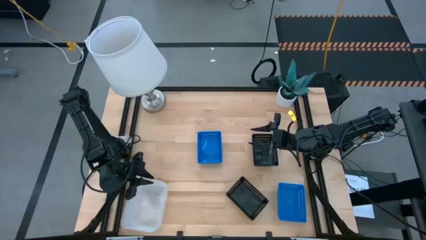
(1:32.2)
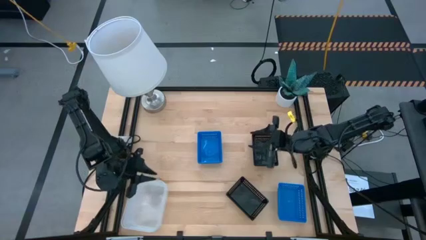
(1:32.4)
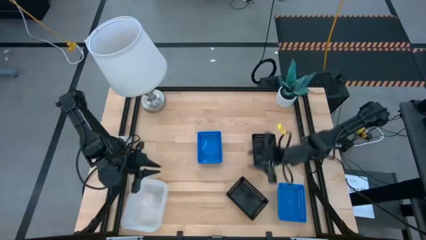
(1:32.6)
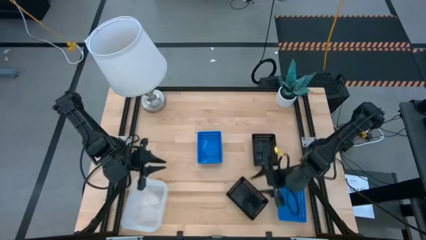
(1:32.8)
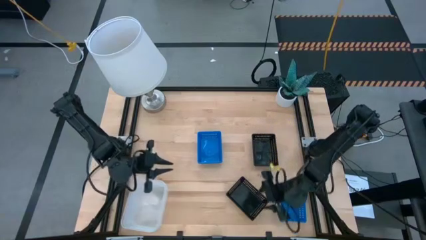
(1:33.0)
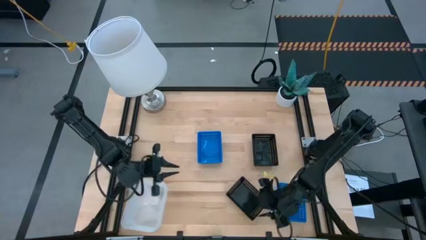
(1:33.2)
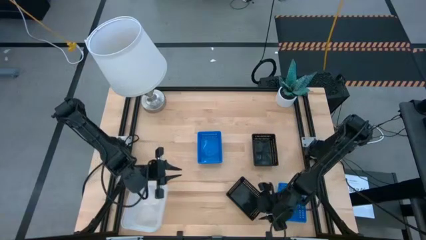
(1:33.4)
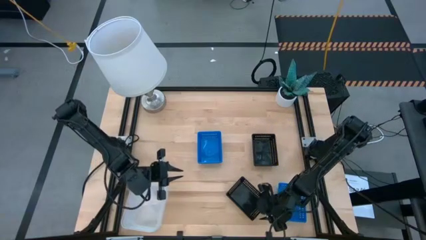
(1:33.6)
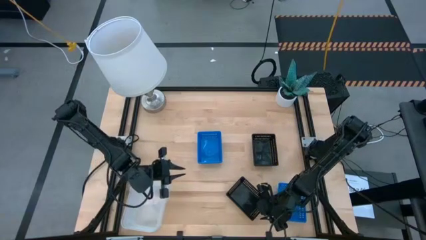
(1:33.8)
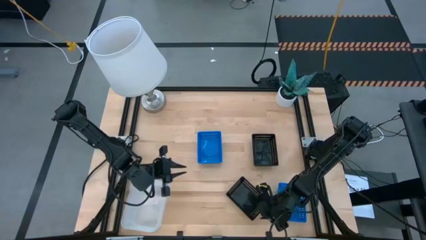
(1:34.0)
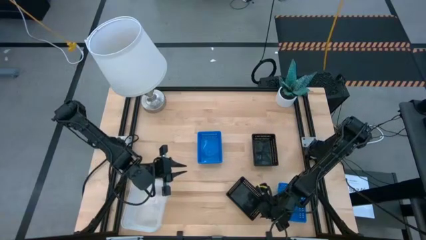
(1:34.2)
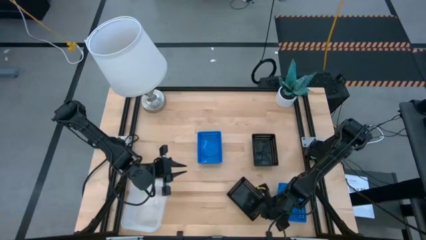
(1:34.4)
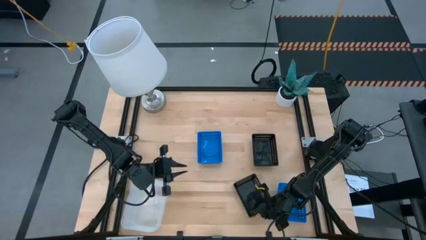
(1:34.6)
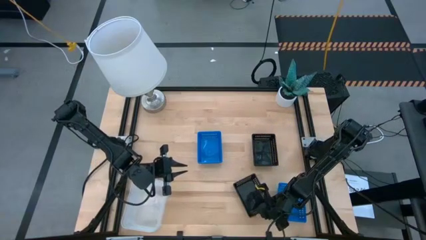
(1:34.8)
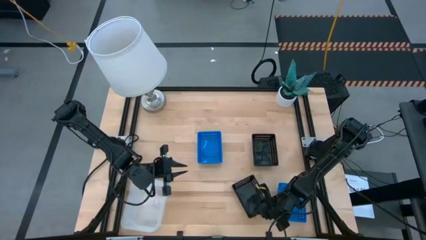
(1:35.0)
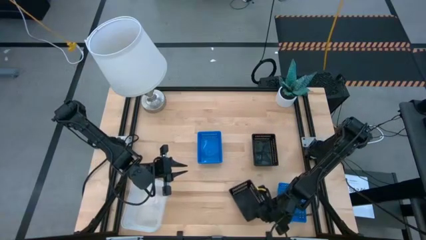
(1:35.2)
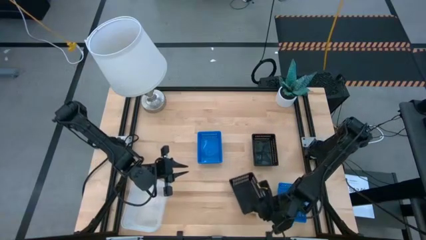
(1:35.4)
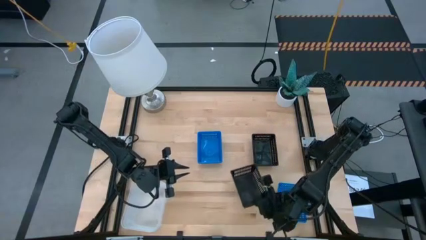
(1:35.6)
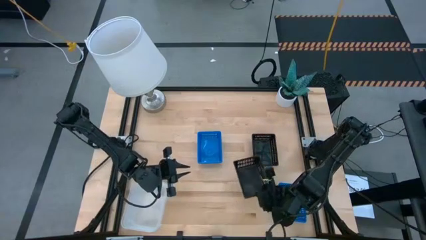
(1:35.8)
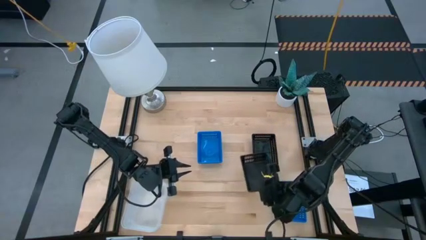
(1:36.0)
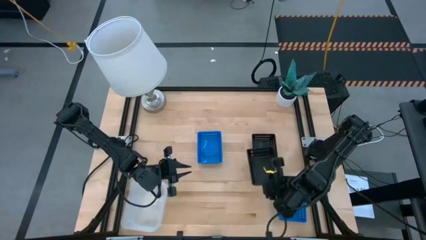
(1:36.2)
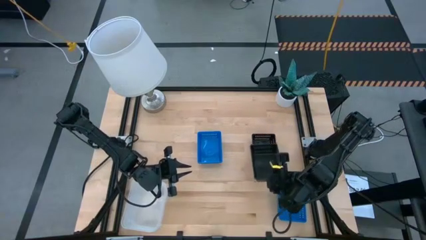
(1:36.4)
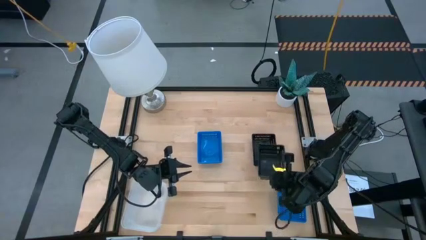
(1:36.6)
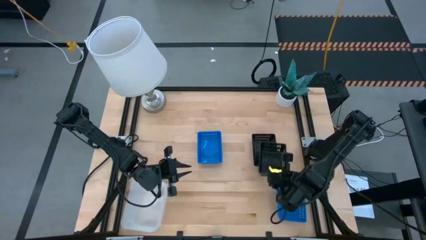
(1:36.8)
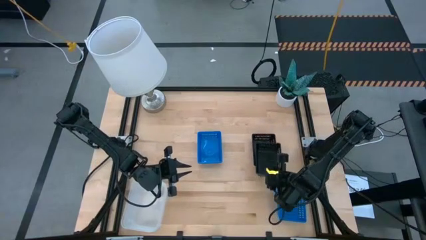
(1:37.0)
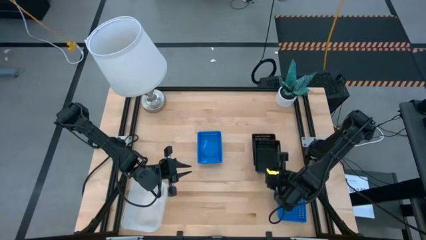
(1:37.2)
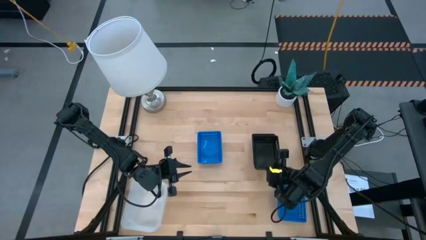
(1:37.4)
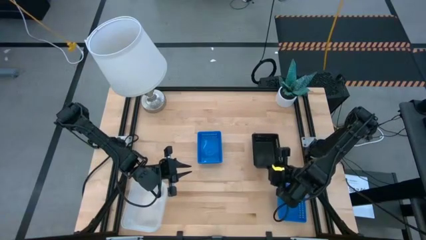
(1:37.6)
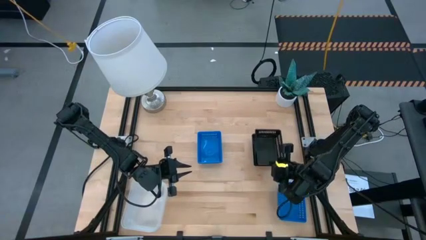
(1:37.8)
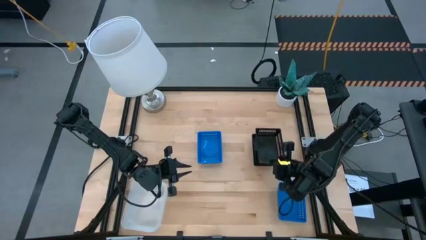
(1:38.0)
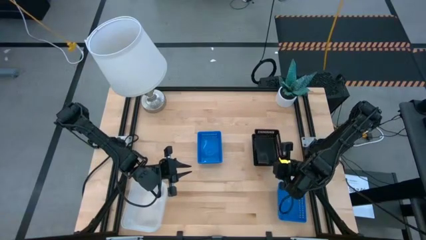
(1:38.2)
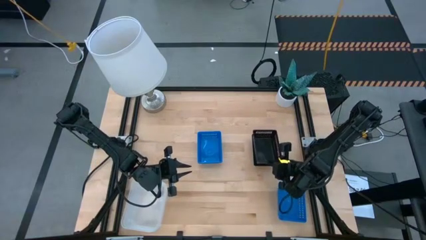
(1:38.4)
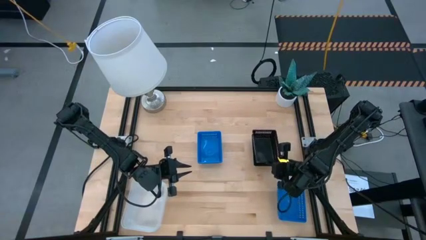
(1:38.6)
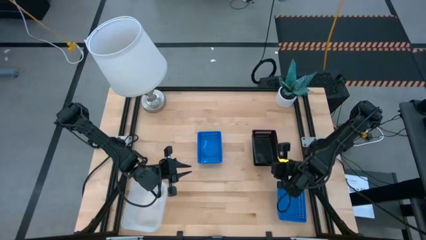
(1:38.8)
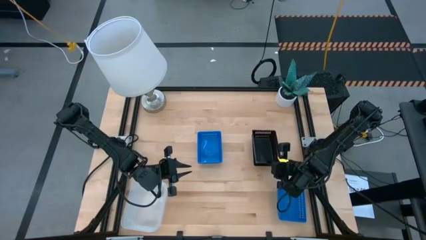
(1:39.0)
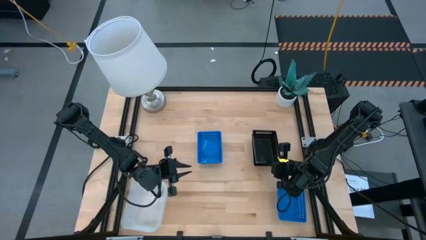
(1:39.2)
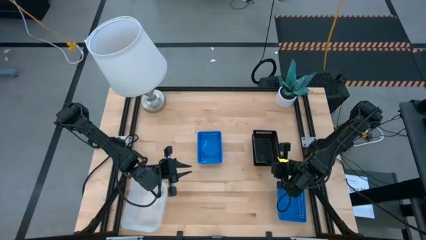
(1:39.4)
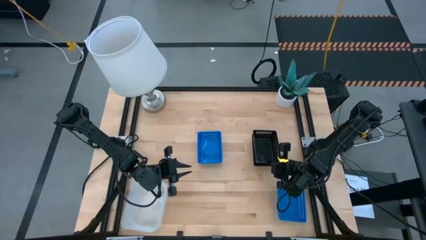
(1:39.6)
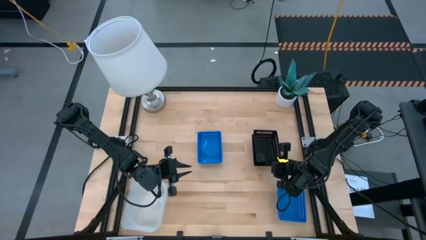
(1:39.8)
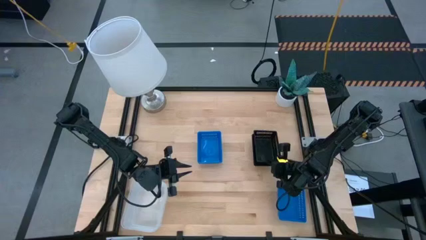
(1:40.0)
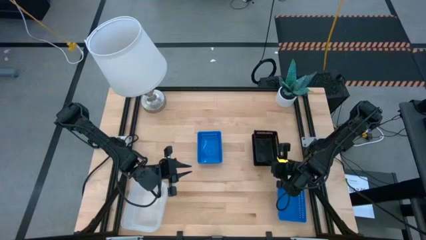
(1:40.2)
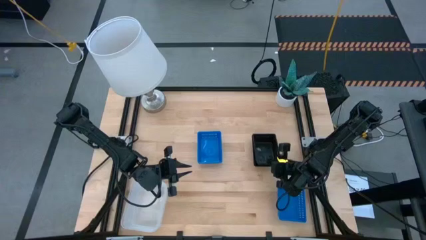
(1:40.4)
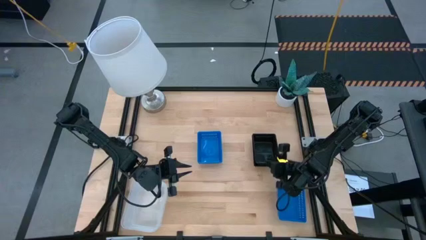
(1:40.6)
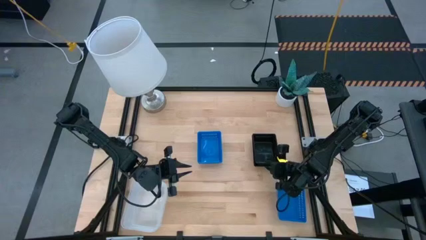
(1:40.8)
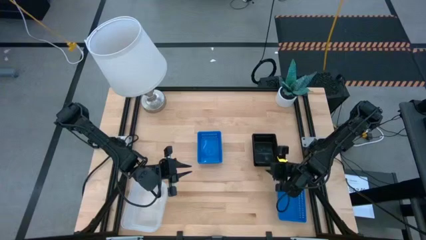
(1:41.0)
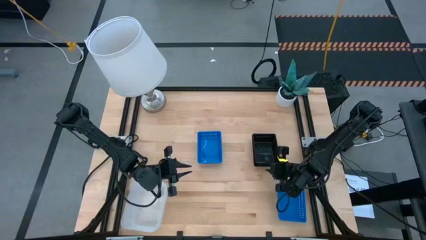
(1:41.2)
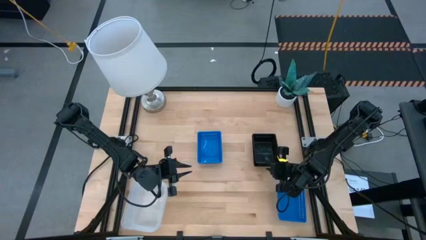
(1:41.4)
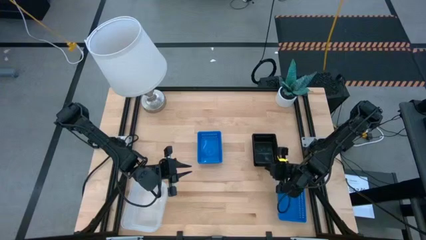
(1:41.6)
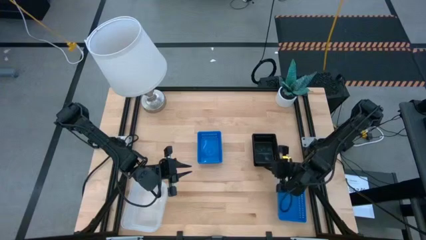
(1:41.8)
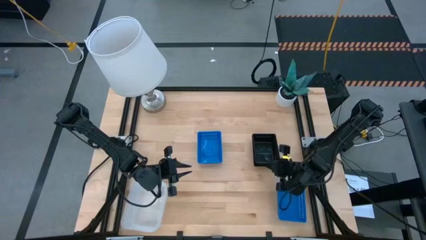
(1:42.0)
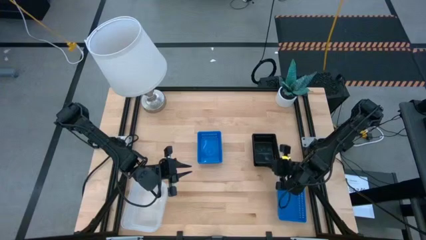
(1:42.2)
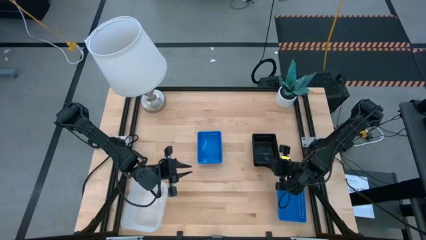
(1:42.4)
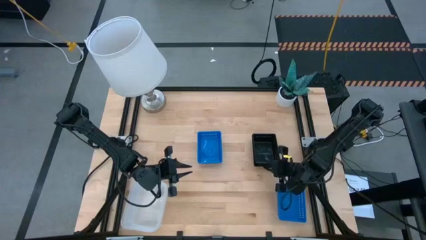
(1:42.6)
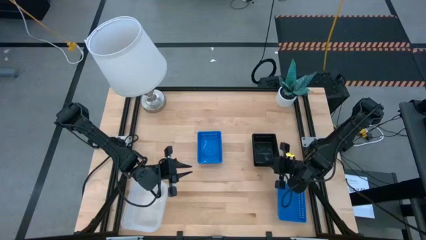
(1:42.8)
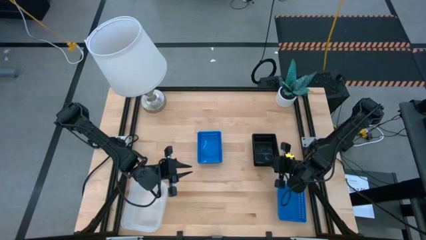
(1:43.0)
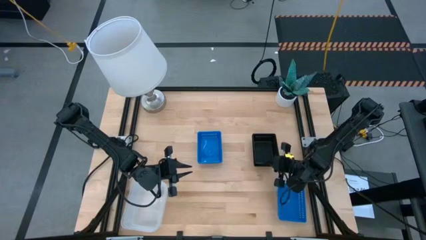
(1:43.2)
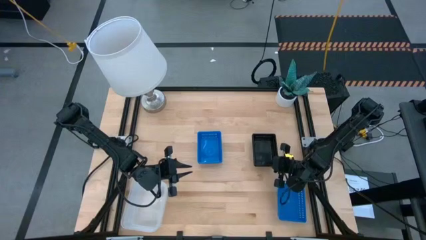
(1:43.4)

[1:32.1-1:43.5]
Stack the bottom black bin on the top black bin

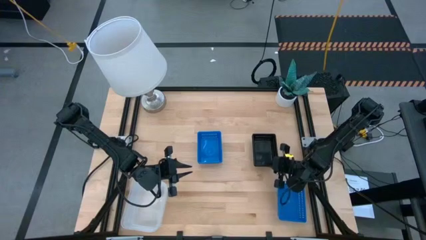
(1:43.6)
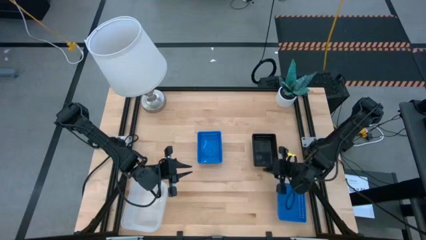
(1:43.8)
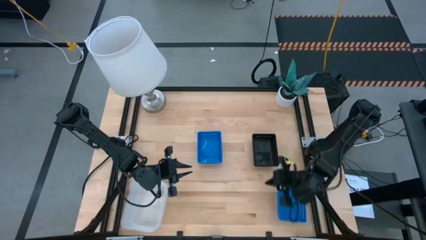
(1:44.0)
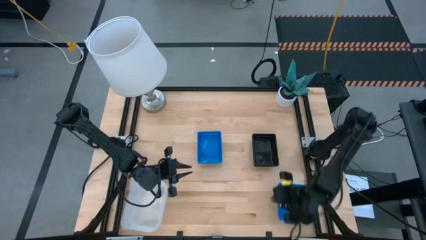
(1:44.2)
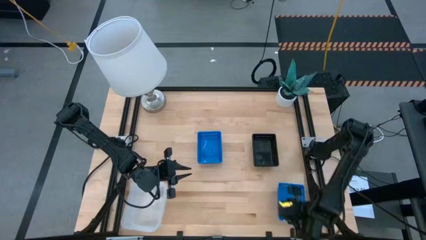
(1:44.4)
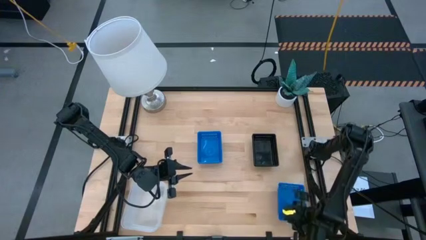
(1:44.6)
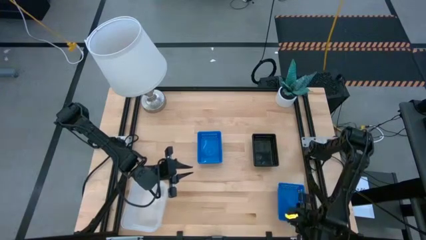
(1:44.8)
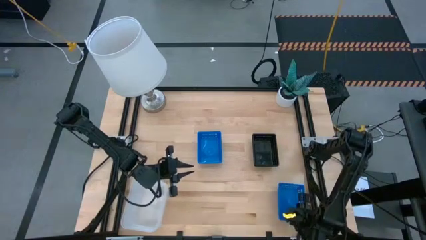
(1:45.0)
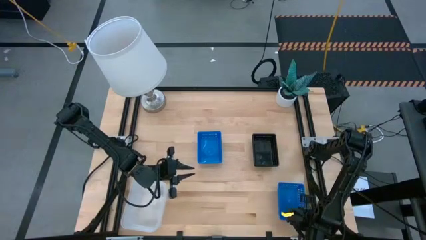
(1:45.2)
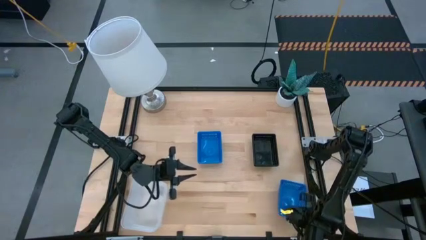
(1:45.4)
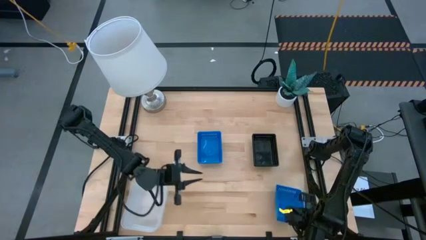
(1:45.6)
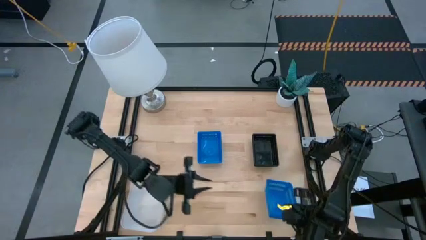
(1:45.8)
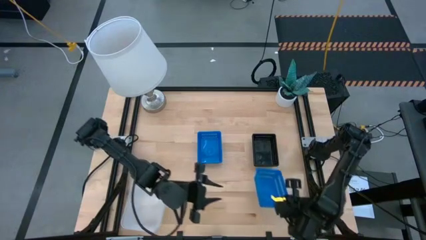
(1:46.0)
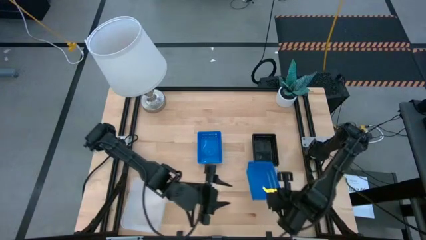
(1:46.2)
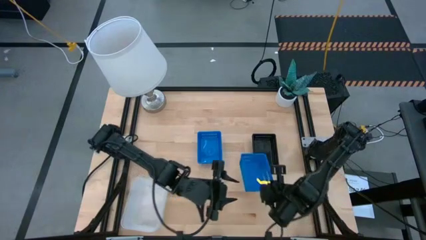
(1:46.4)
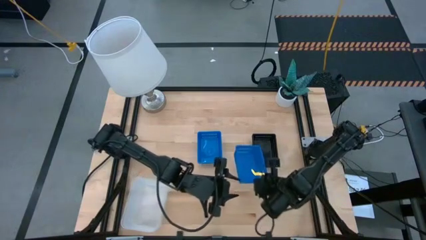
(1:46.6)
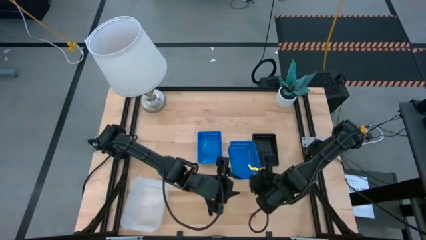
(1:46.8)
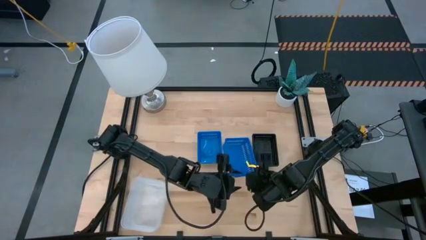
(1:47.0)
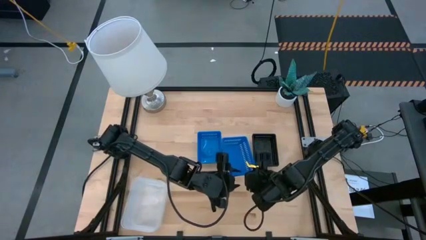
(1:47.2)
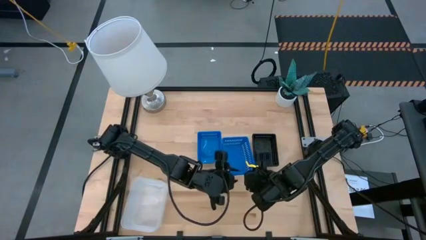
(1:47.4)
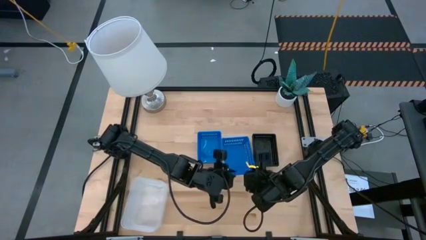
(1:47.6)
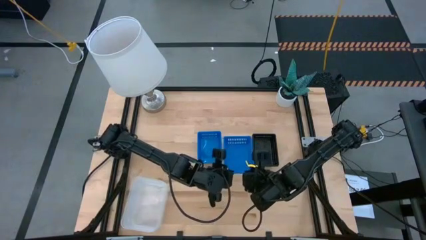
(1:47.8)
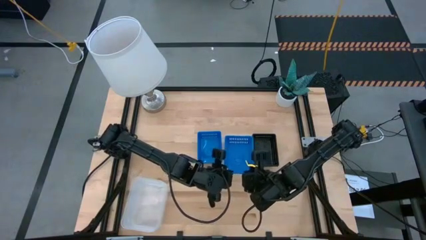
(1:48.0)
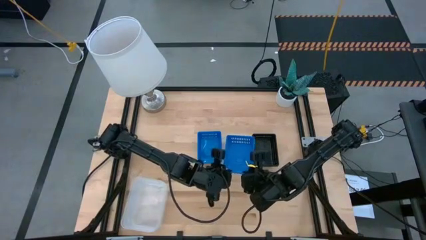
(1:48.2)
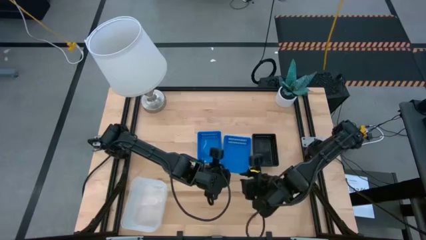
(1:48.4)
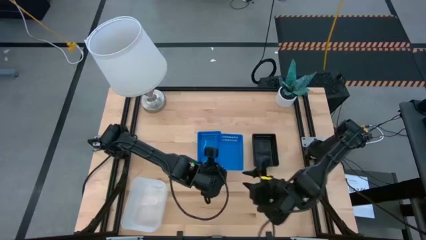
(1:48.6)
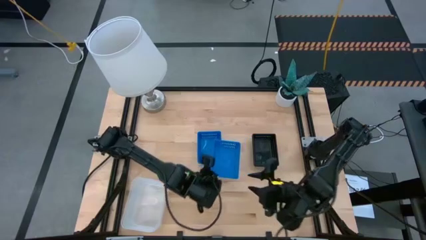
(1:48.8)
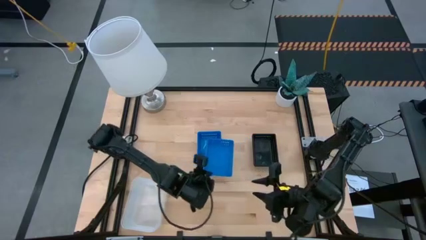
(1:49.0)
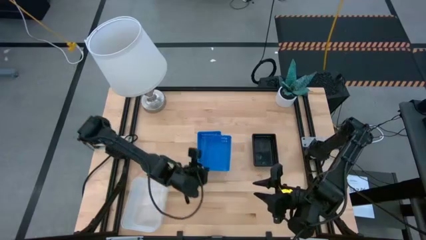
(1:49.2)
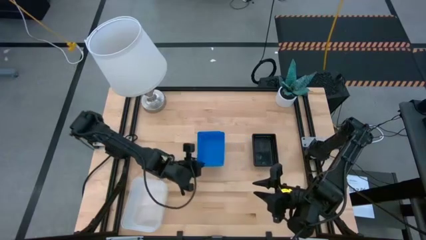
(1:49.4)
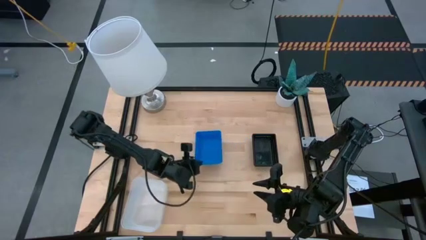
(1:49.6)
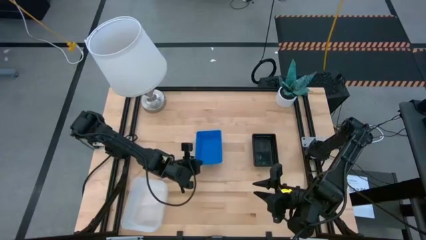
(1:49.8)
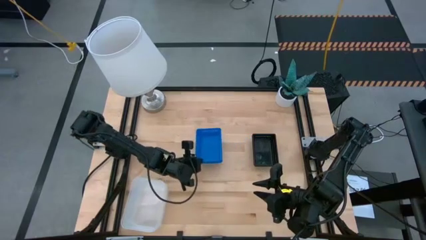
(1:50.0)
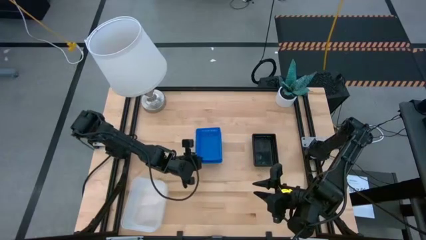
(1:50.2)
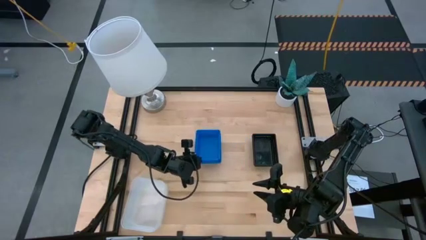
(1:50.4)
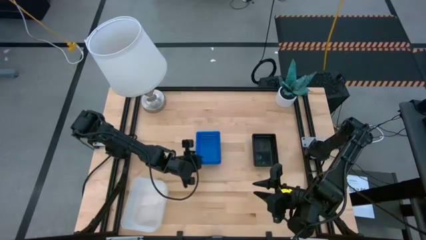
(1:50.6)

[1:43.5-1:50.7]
Stack the right blue bin on the left blue bin
